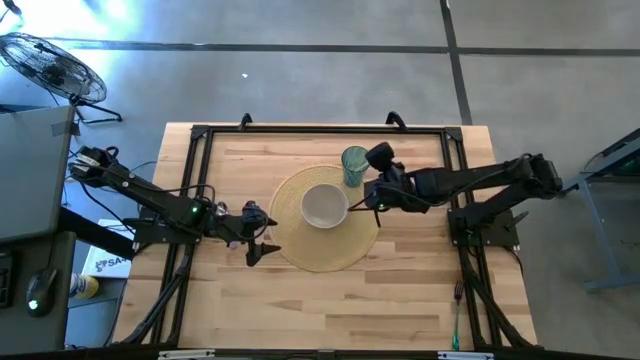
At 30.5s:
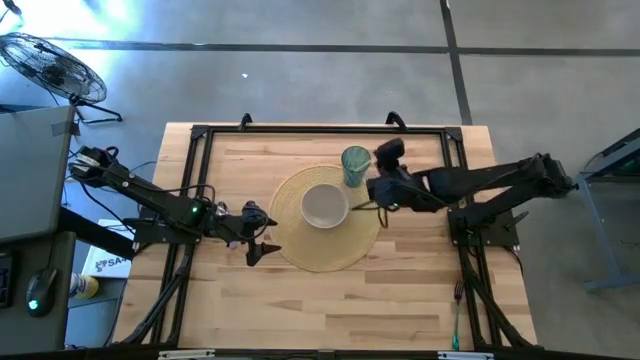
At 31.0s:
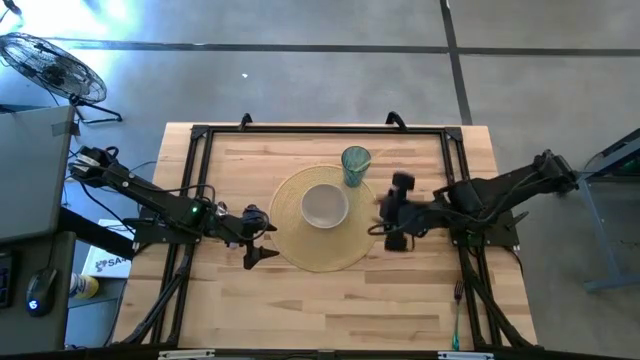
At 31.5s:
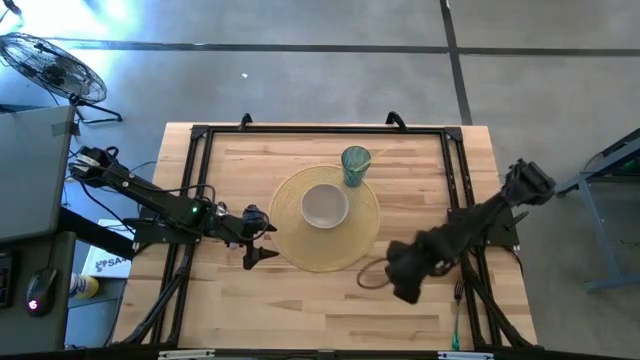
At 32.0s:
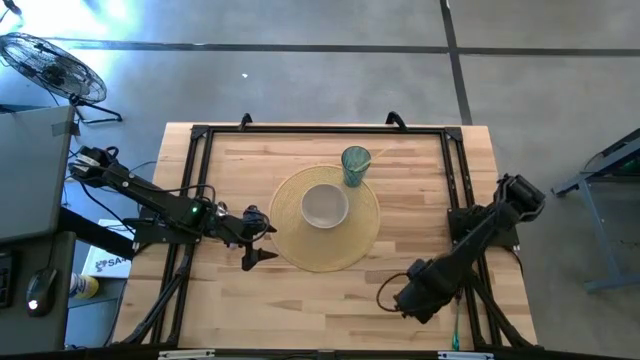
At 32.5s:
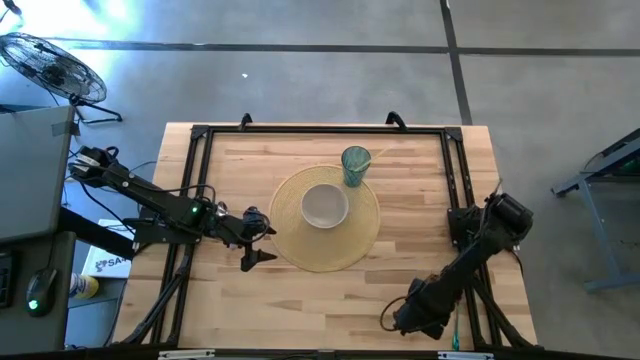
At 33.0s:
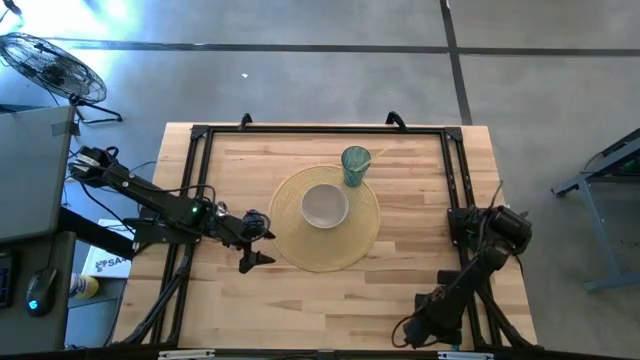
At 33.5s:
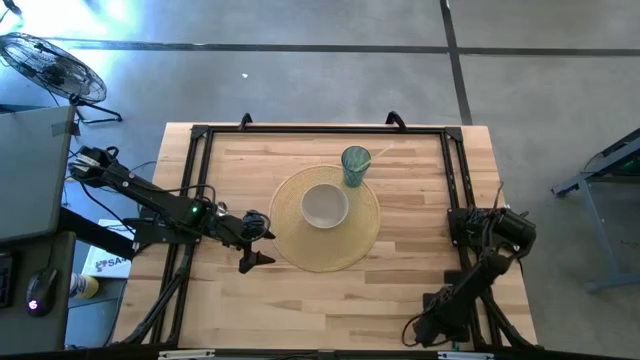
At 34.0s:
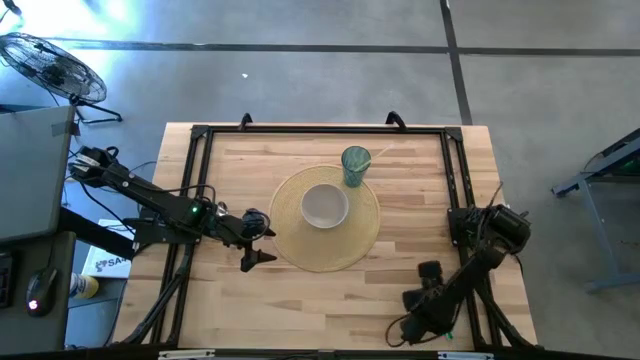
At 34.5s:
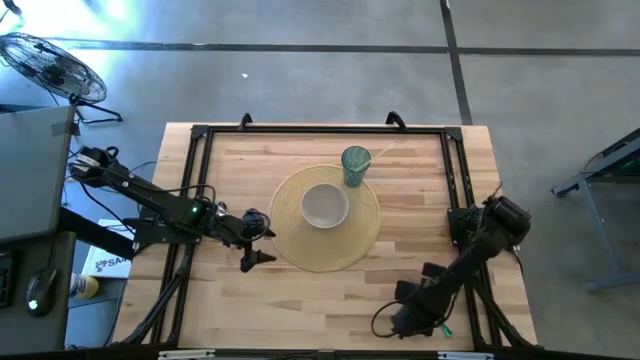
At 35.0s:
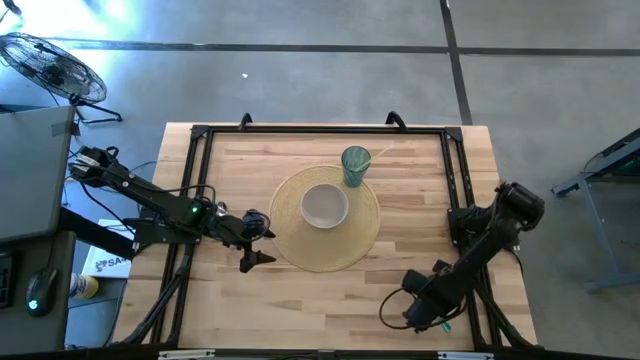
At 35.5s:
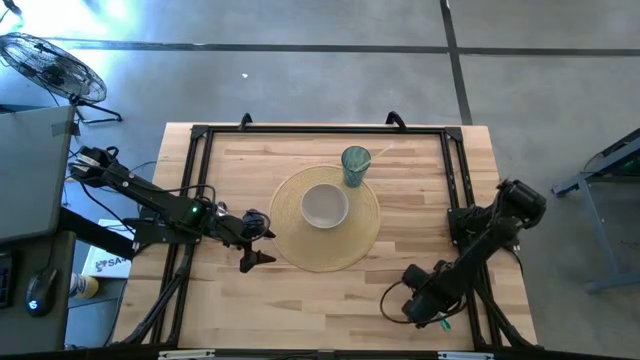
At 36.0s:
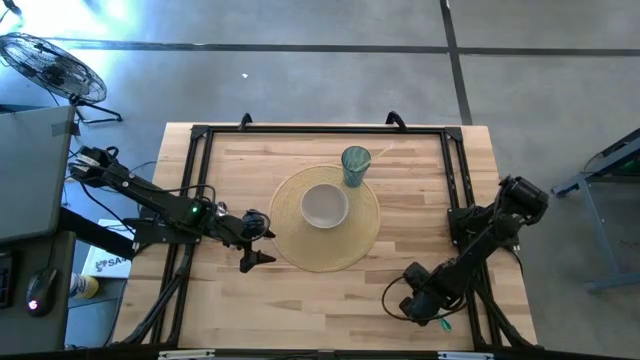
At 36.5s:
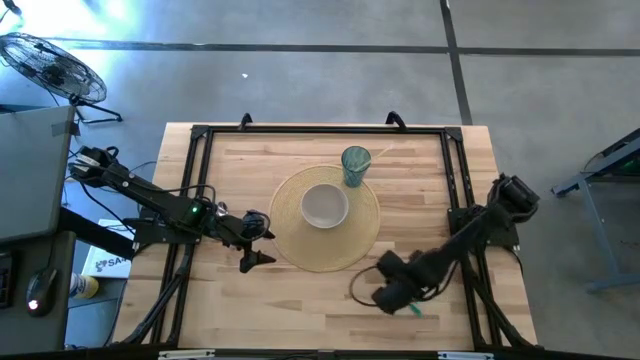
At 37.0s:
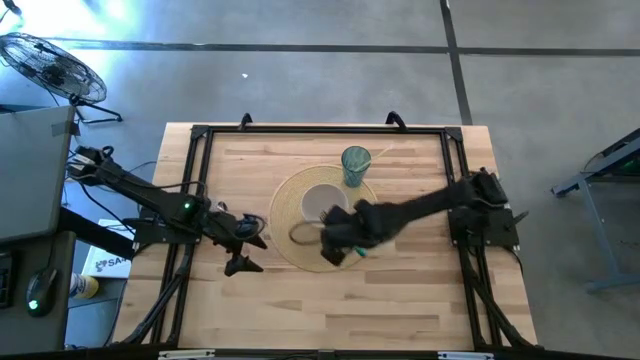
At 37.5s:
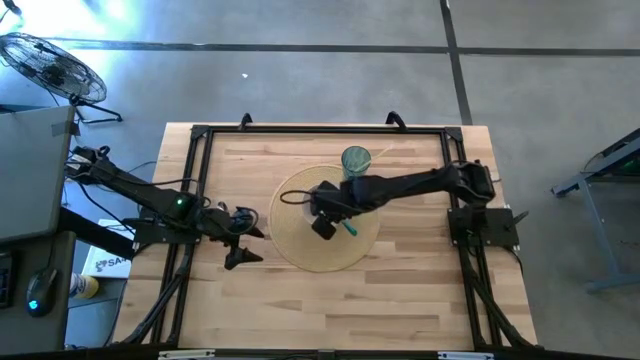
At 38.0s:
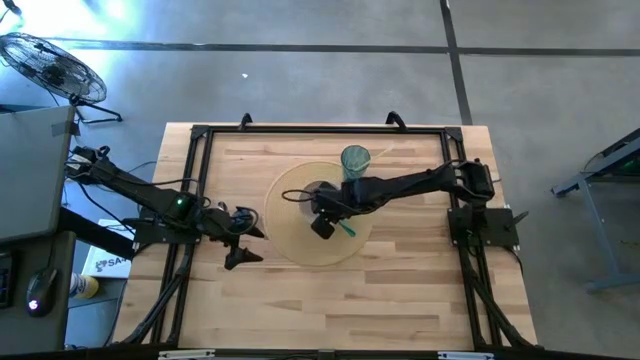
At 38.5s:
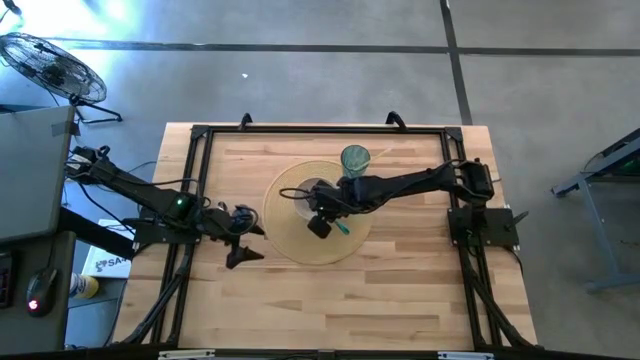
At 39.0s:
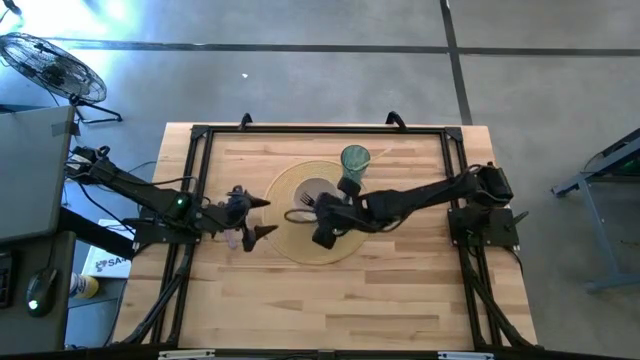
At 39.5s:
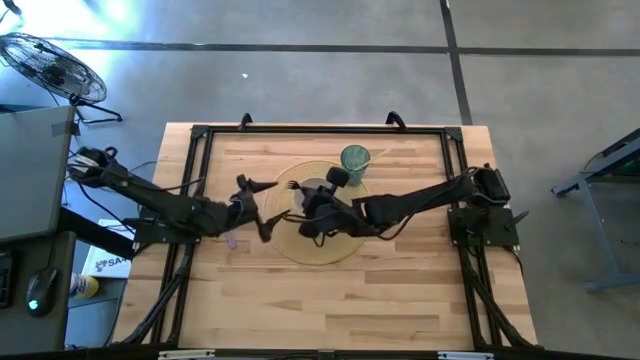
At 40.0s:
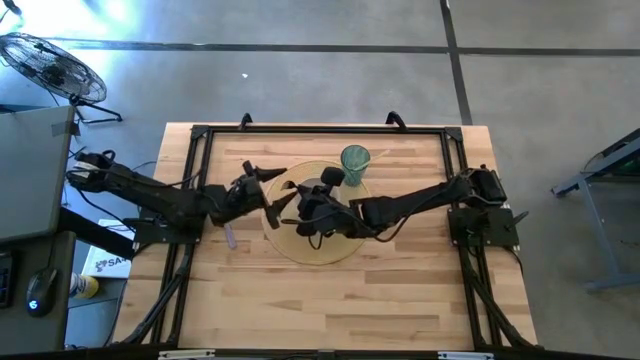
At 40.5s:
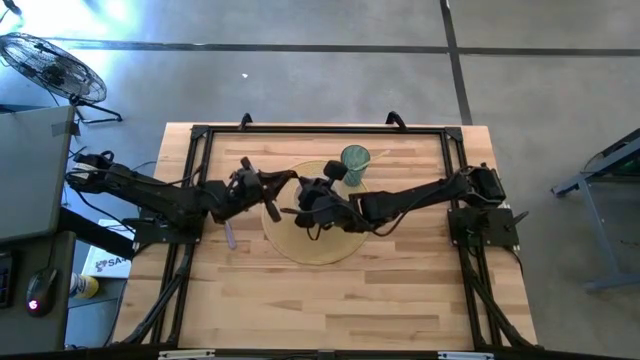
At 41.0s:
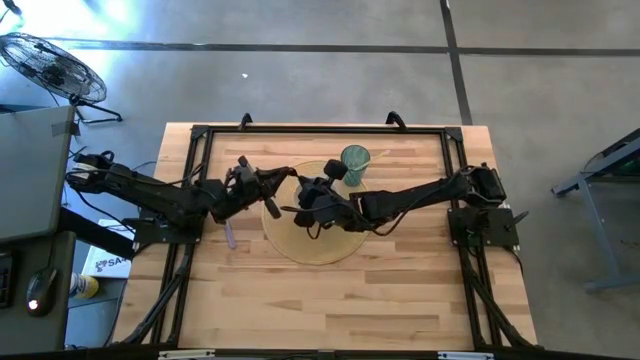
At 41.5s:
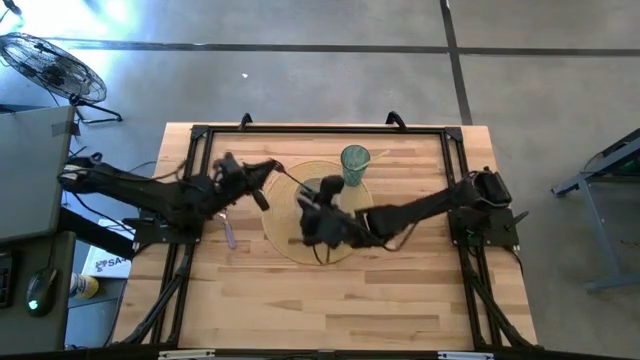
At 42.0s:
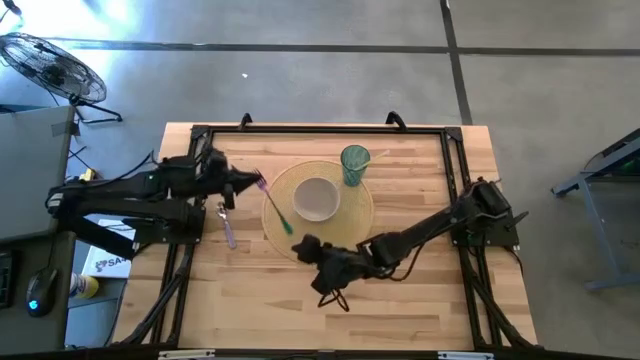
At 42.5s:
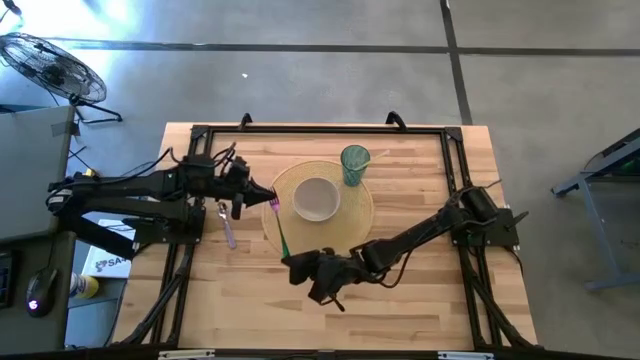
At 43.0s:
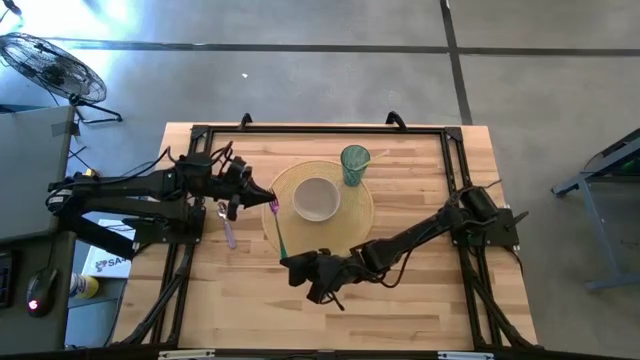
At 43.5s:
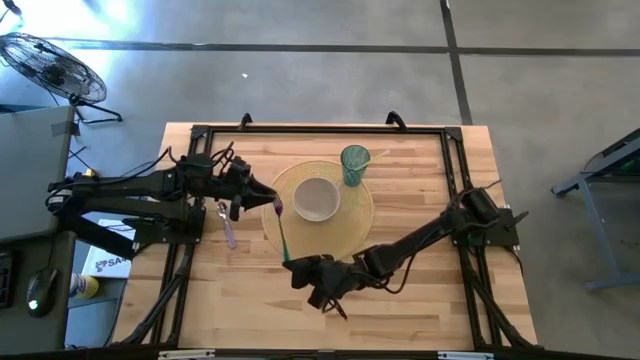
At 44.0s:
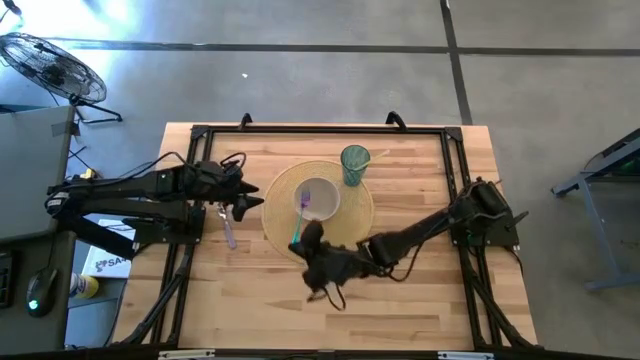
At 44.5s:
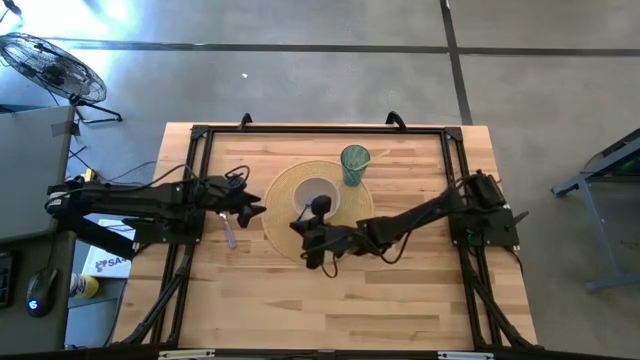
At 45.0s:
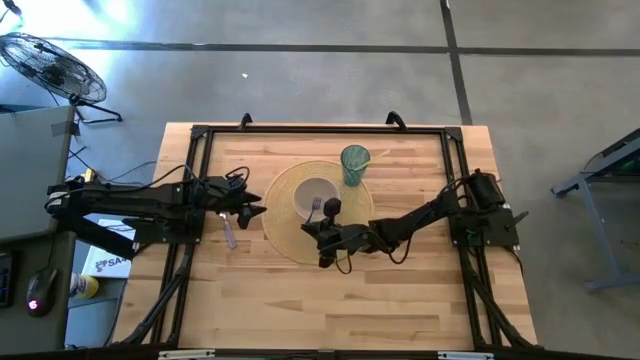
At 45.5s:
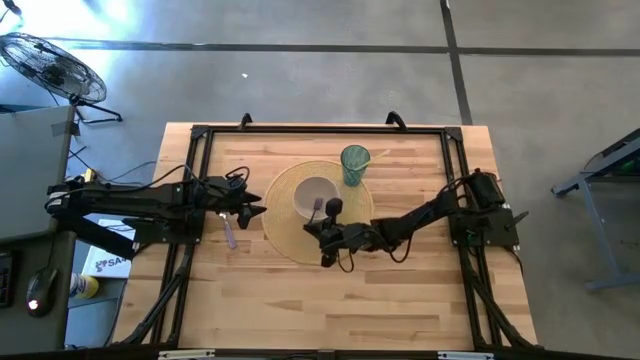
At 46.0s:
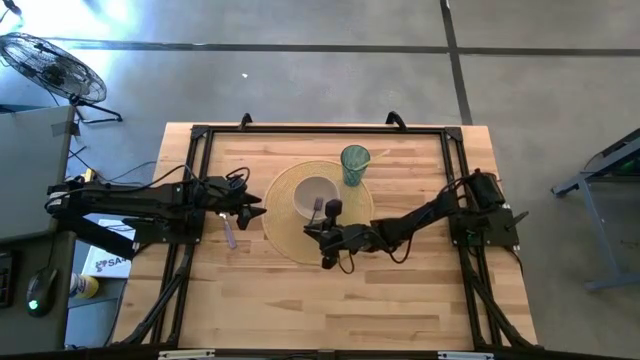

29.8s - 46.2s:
Task: Pick & Place Utensil
Place the purple fork into the white bowl

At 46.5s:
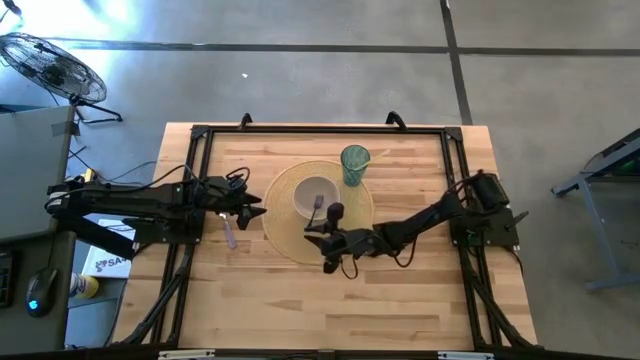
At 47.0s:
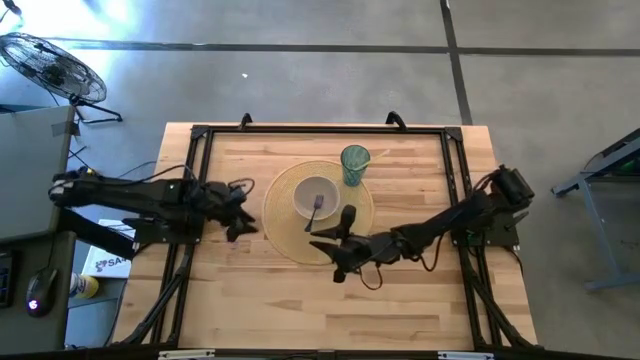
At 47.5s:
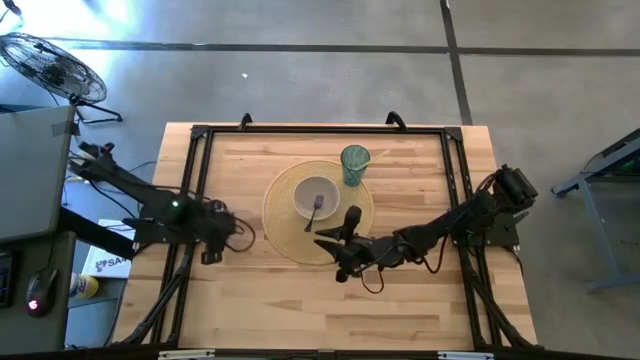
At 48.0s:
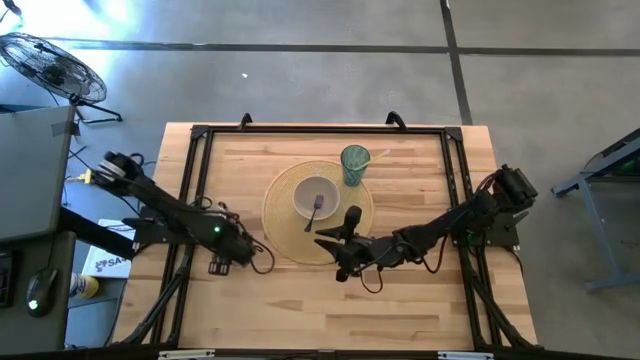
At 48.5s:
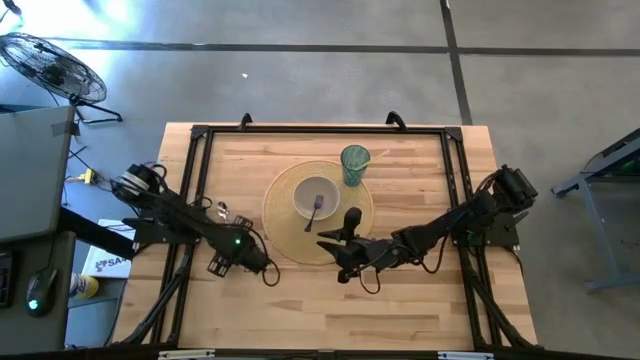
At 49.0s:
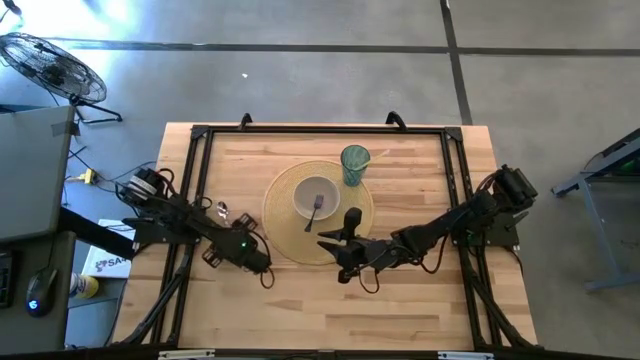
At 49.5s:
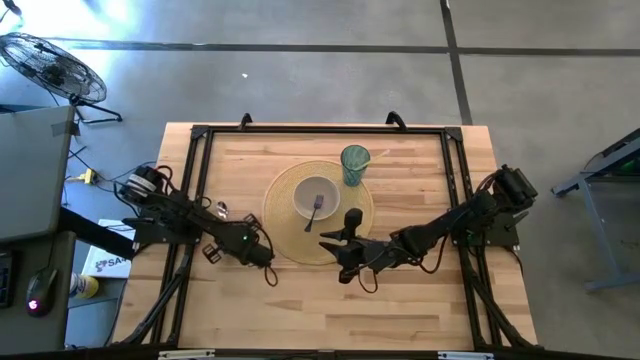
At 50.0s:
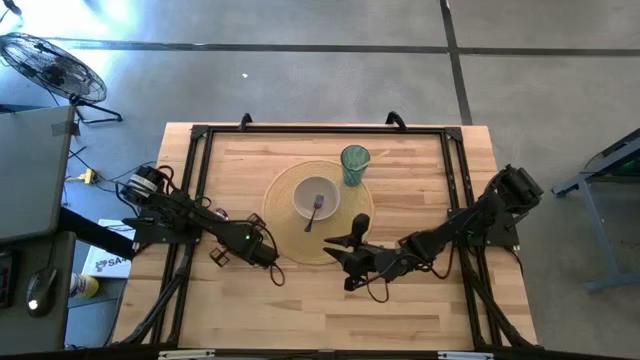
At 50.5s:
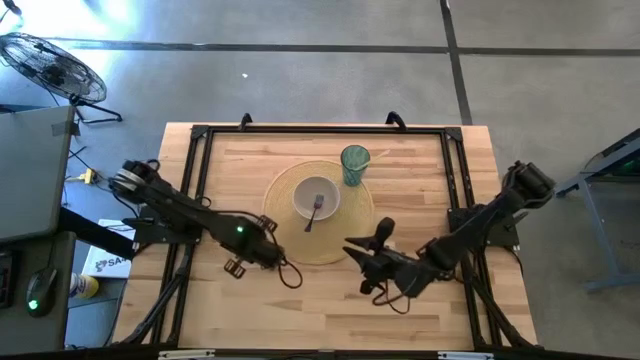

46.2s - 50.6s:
Place the purple spoon into the white bowl
